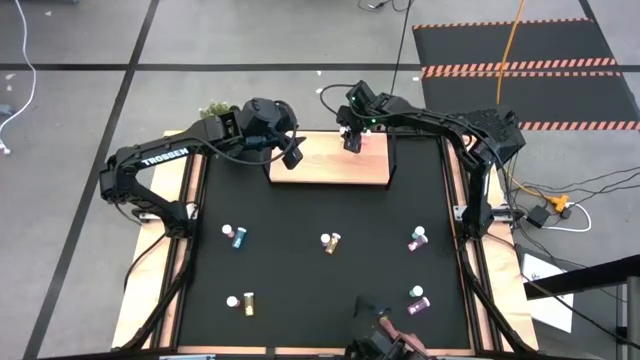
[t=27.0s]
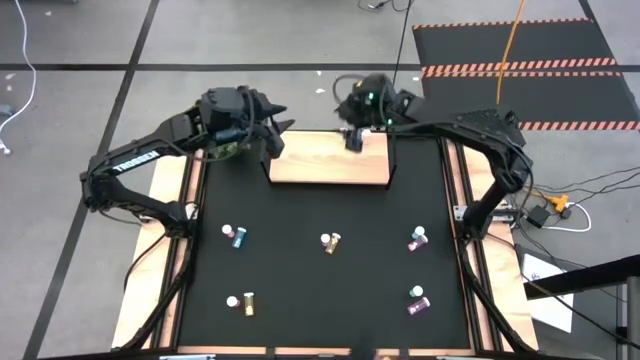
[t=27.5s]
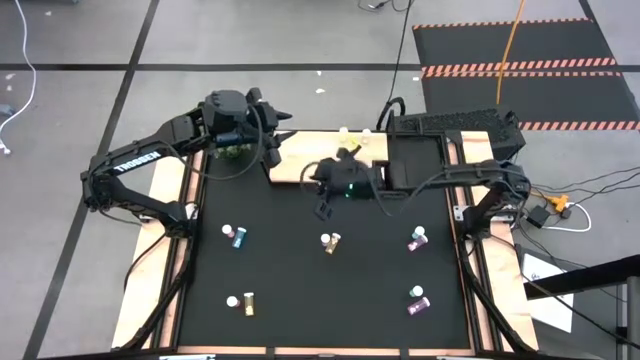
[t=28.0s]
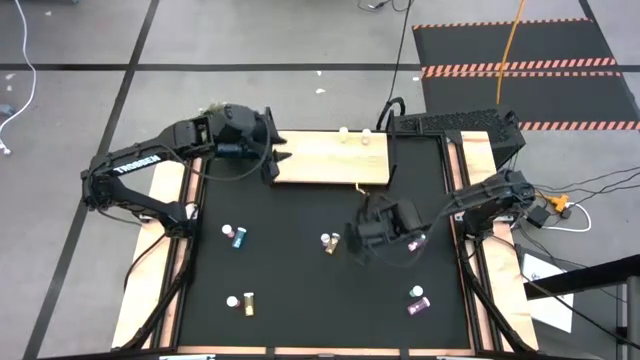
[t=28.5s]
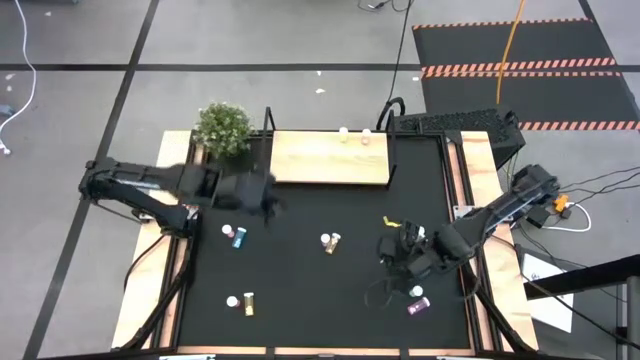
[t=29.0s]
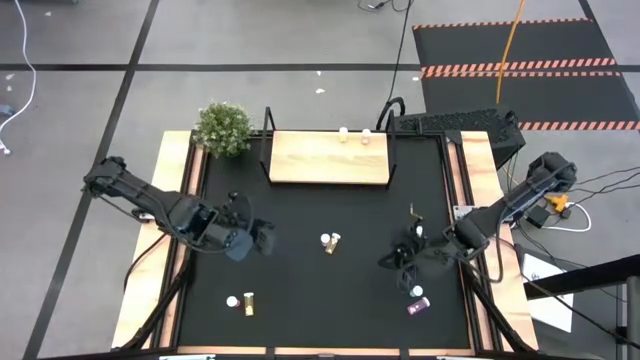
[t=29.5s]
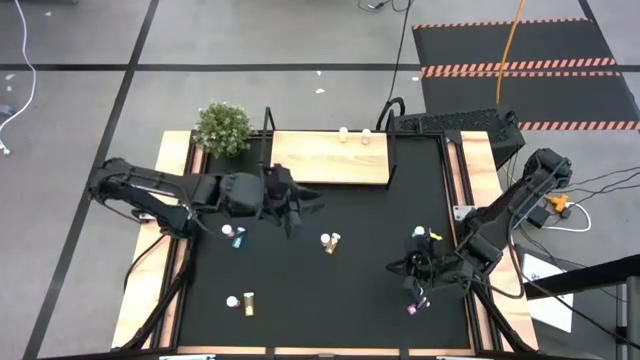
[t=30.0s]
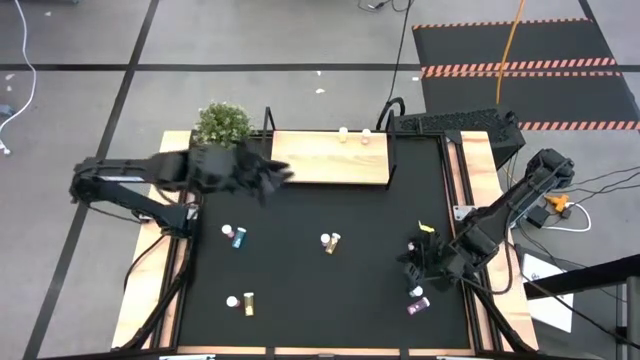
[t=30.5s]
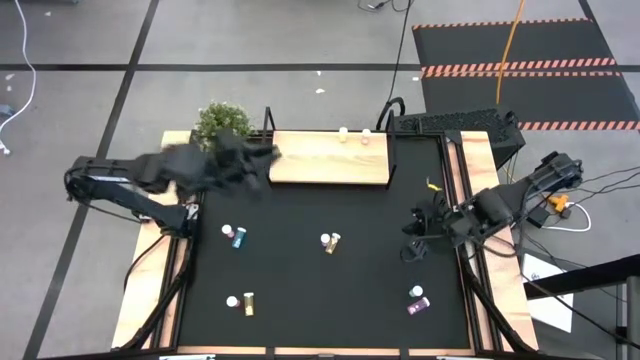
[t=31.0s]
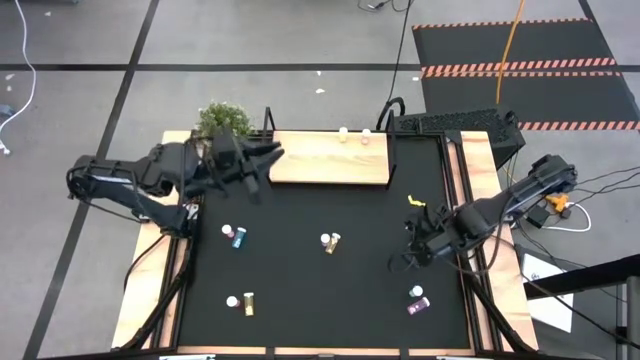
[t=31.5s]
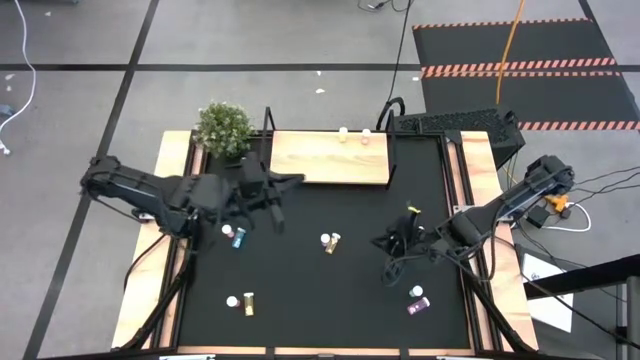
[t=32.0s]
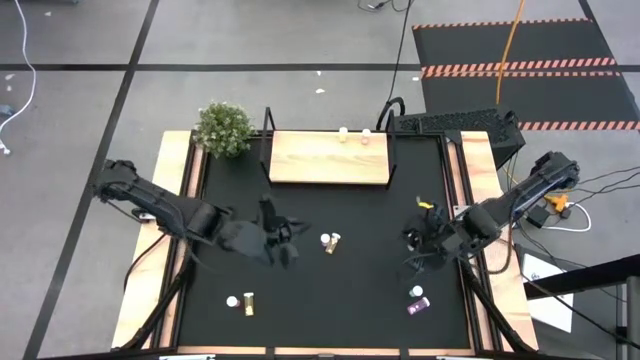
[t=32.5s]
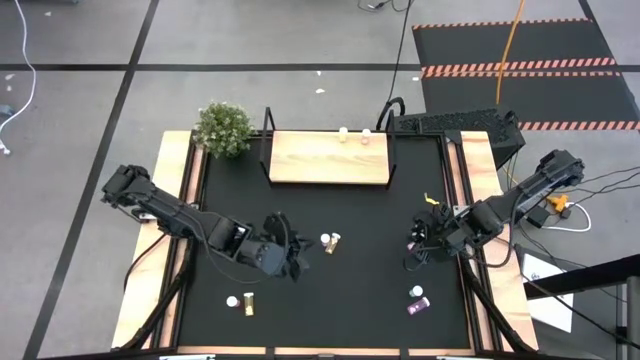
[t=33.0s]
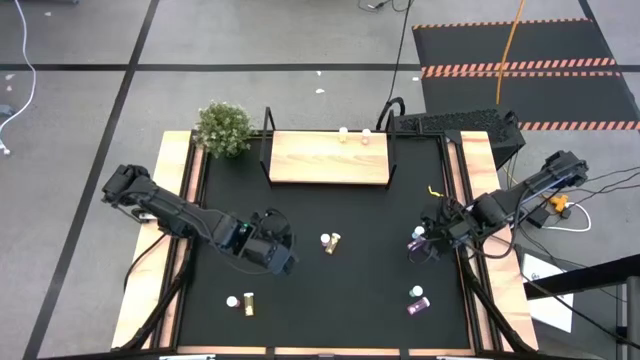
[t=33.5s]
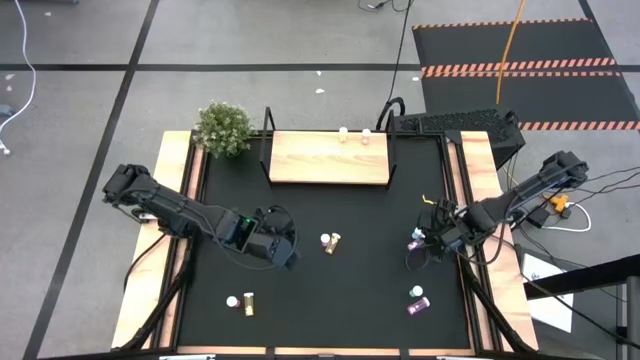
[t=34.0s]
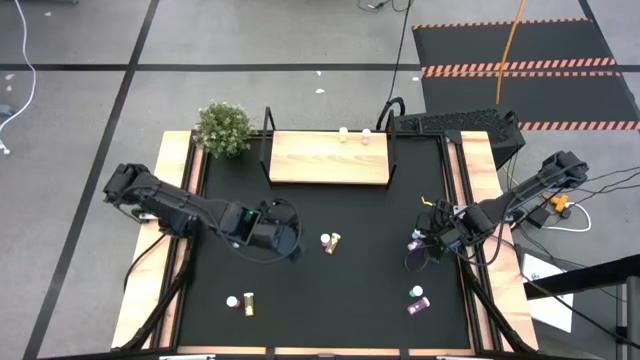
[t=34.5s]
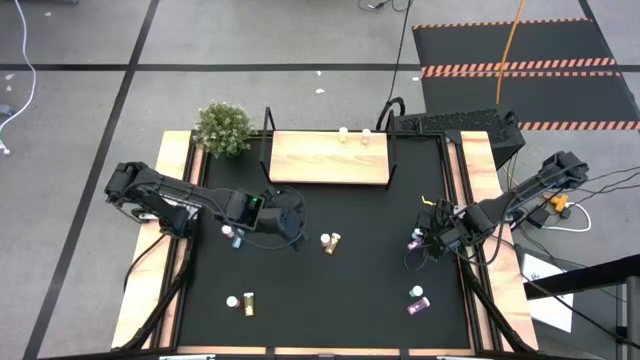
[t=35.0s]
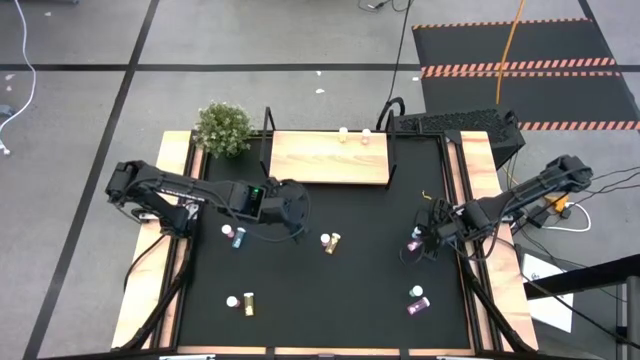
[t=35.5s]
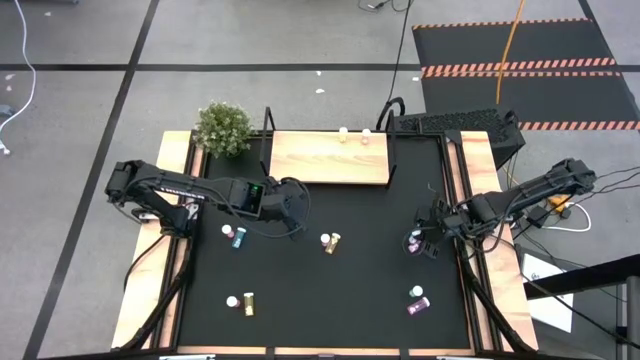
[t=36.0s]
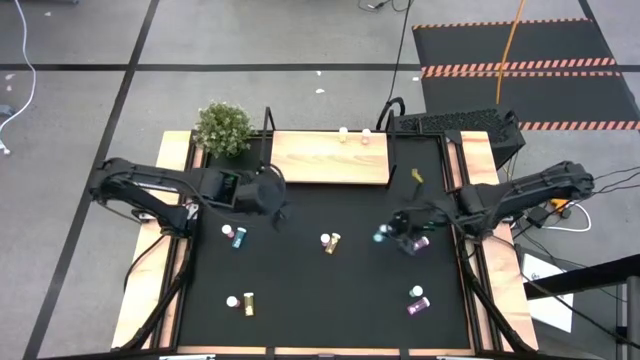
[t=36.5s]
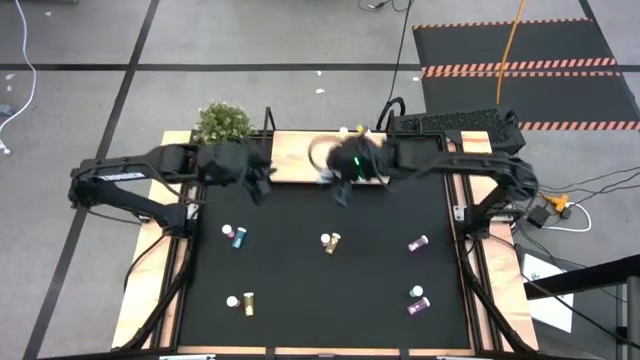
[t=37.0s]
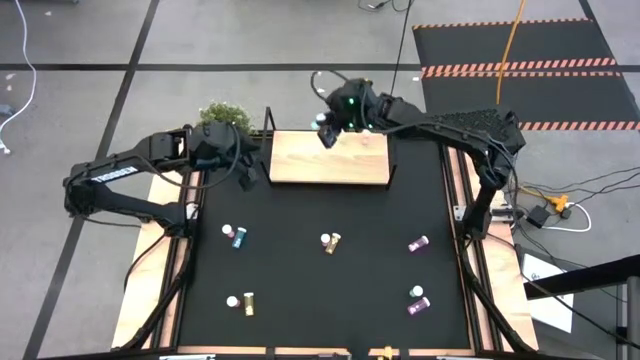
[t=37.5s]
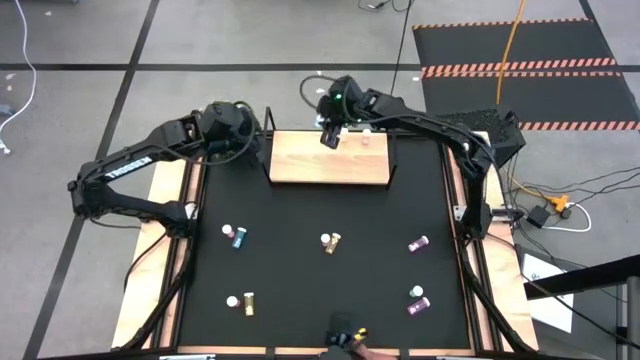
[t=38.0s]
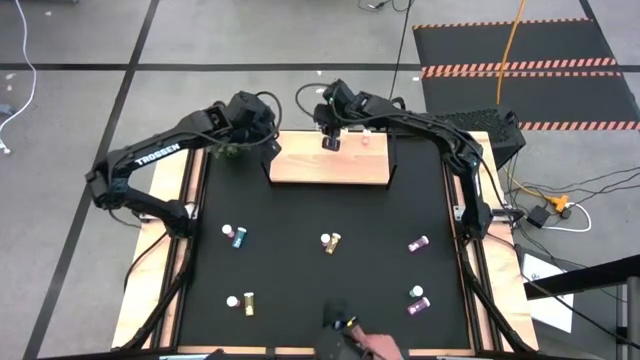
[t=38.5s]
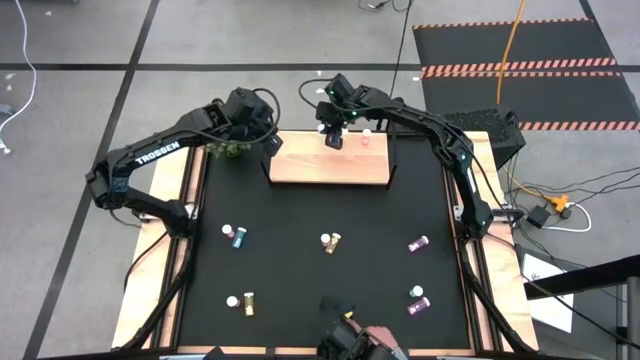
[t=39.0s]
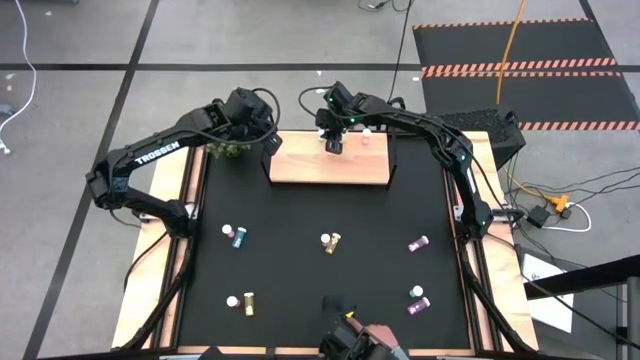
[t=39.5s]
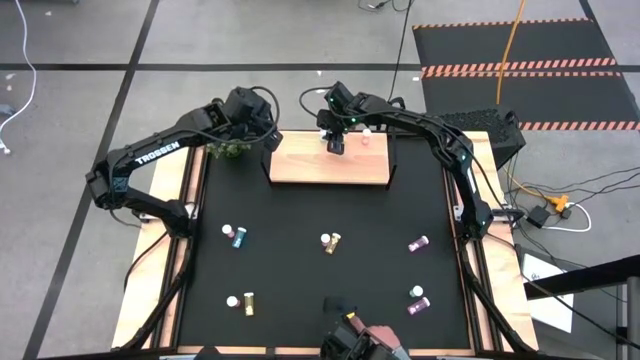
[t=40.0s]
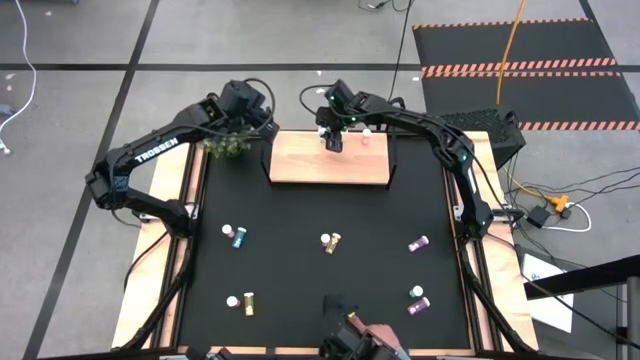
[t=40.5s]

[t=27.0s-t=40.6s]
Task: Pick and place medicine bottles onto shelf by color
Put the top right blue pill bottle on the shelf

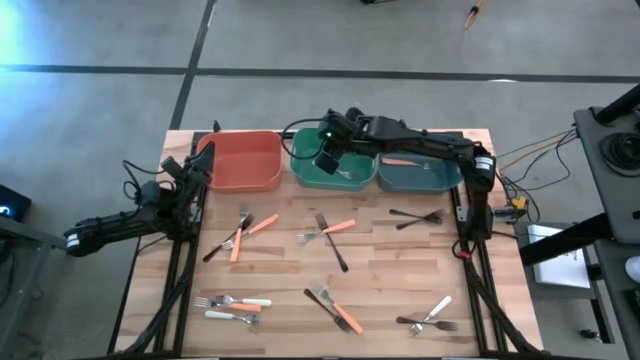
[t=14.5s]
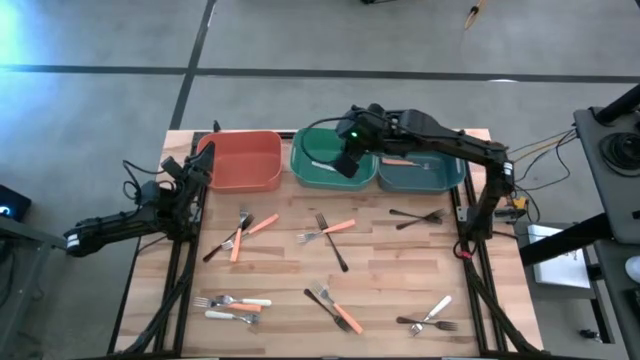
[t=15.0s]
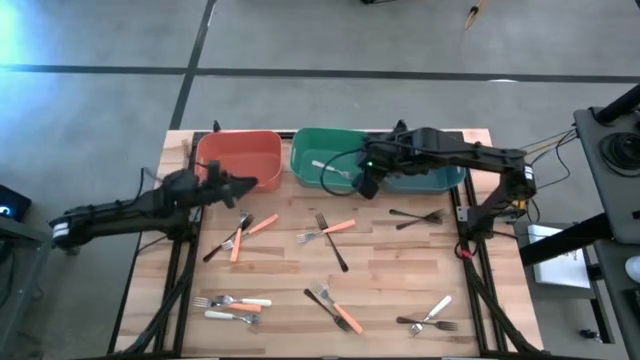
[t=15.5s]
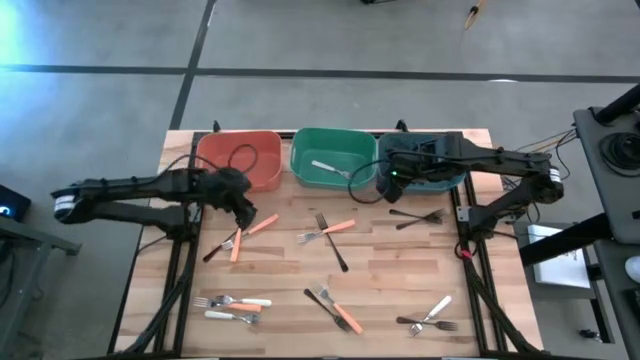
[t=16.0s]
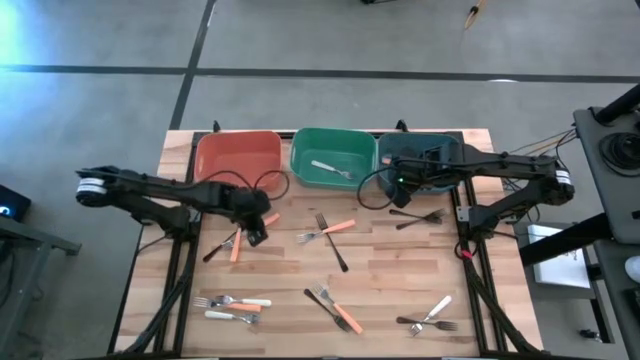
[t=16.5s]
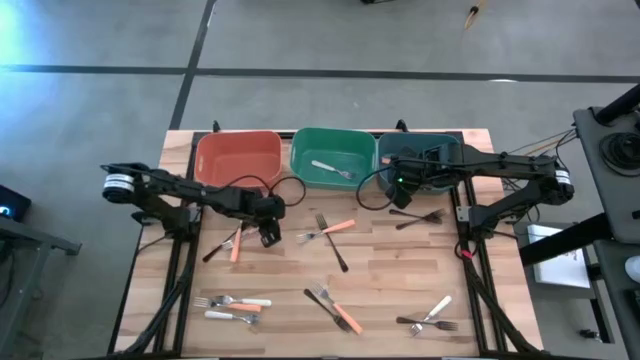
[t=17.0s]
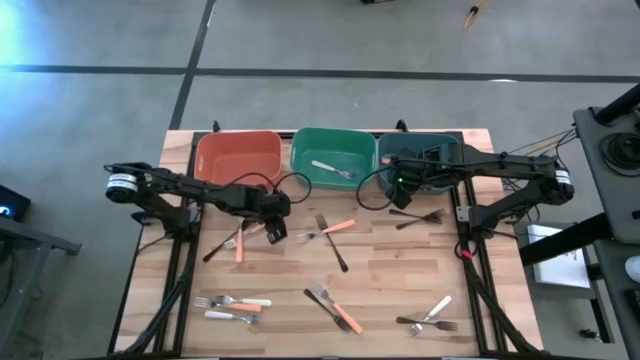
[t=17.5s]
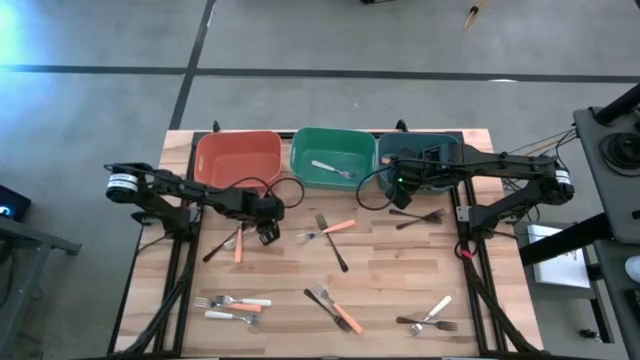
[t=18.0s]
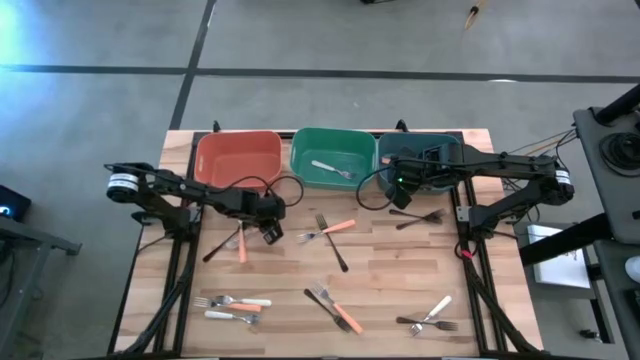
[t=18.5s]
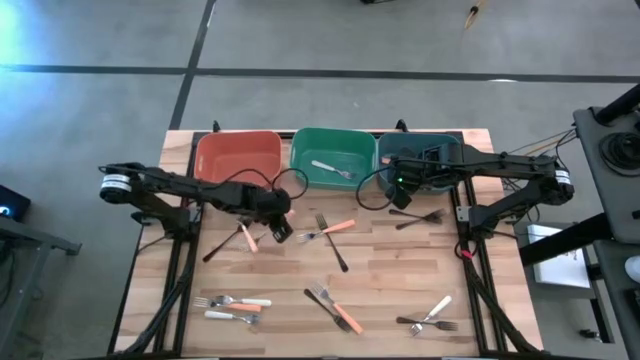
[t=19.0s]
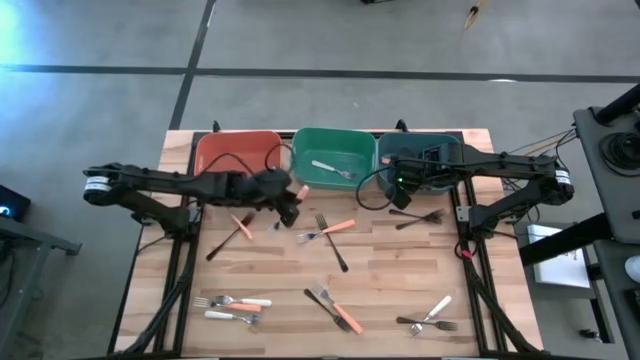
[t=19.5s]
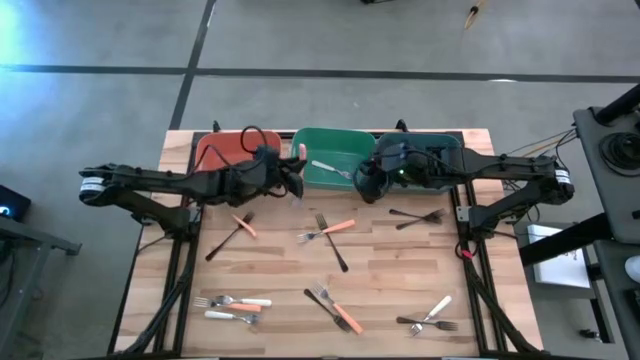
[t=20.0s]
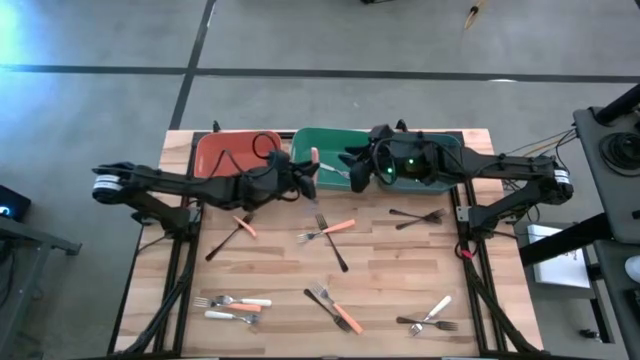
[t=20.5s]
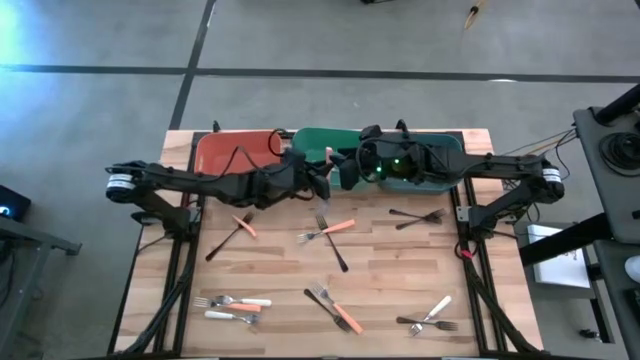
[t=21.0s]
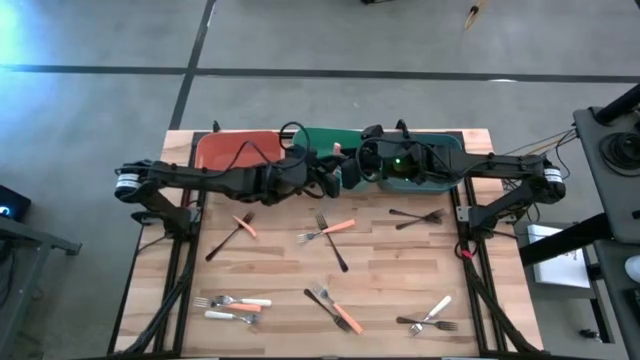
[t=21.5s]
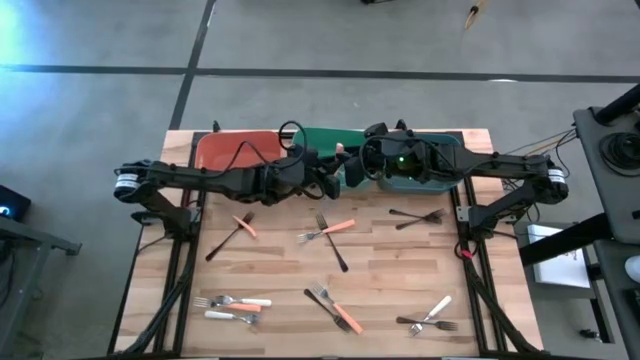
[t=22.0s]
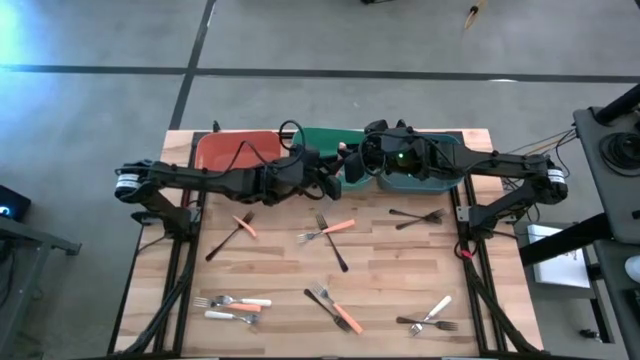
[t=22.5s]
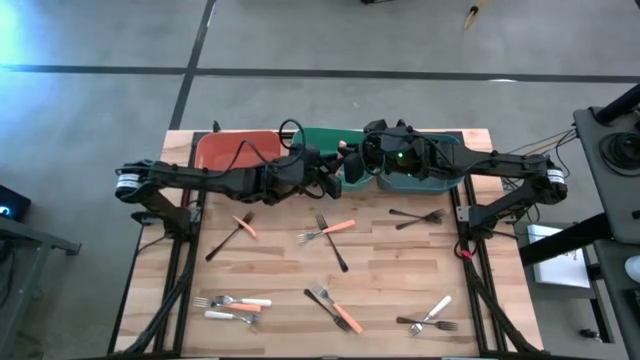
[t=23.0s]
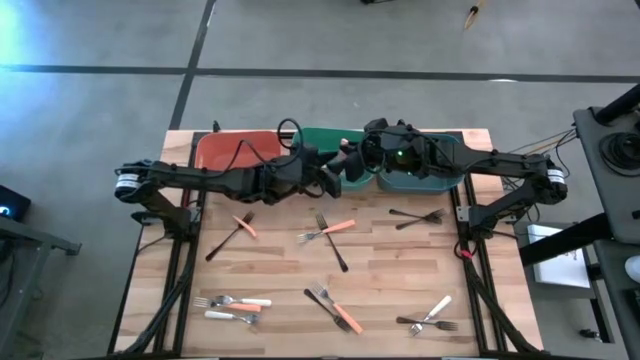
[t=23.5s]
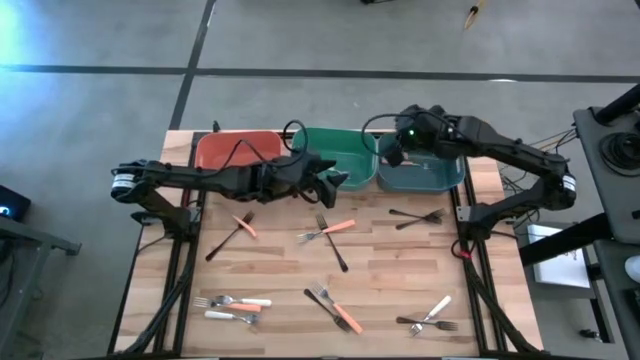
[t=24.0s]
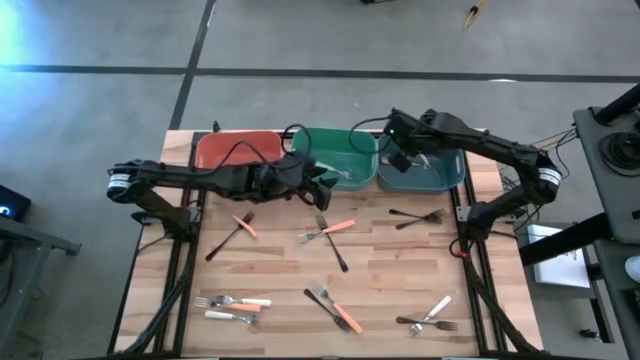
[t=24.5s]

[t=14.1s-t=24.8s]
Task: Sort silverware by color (type)
Put the light orange fork into the blue bin
